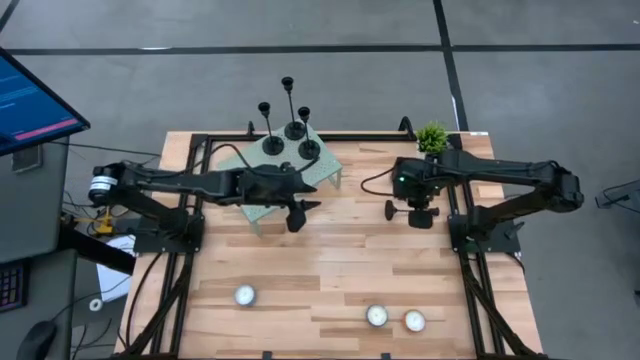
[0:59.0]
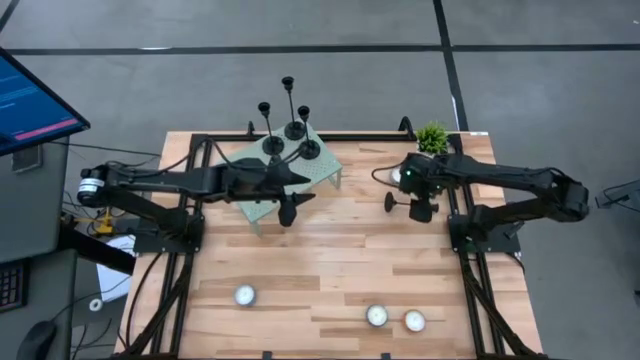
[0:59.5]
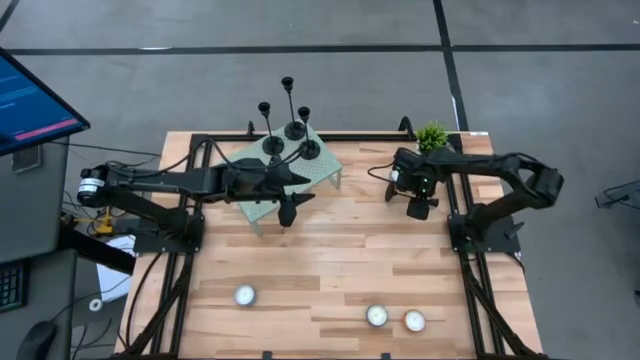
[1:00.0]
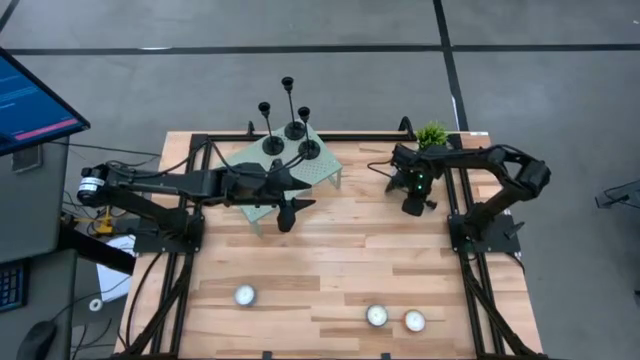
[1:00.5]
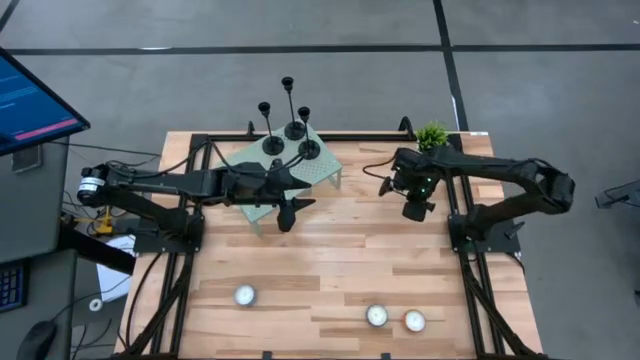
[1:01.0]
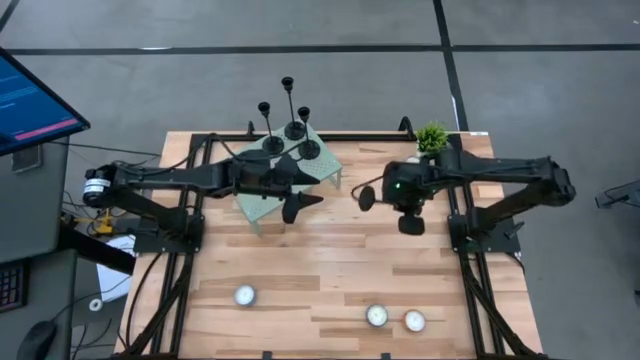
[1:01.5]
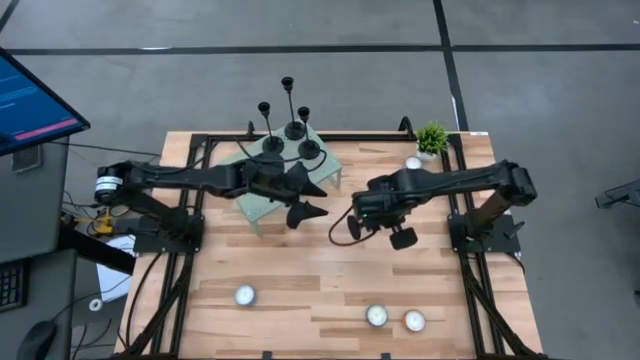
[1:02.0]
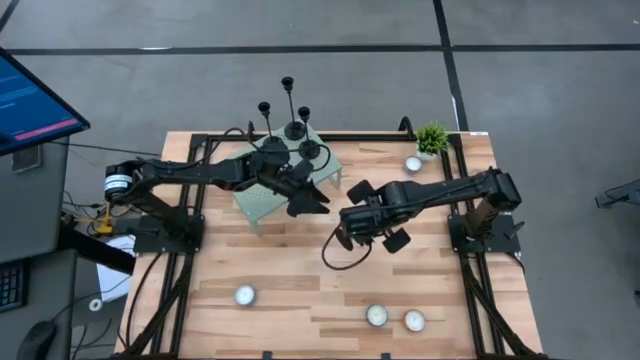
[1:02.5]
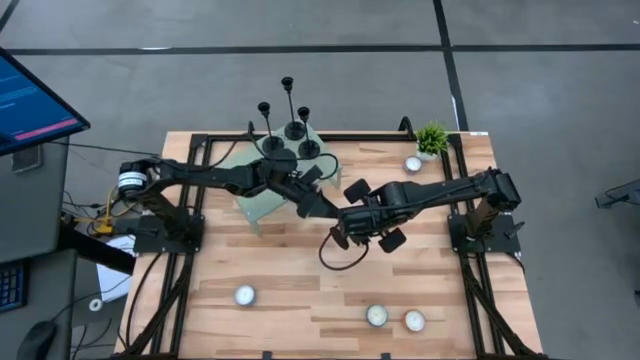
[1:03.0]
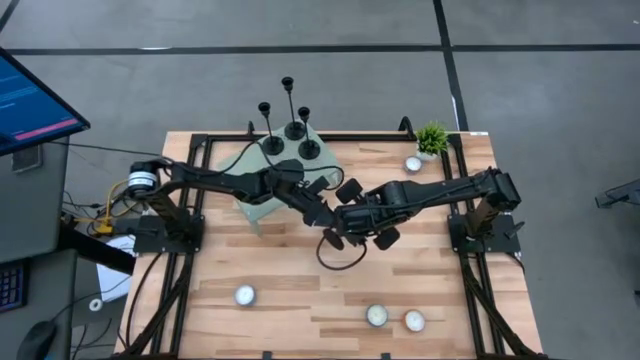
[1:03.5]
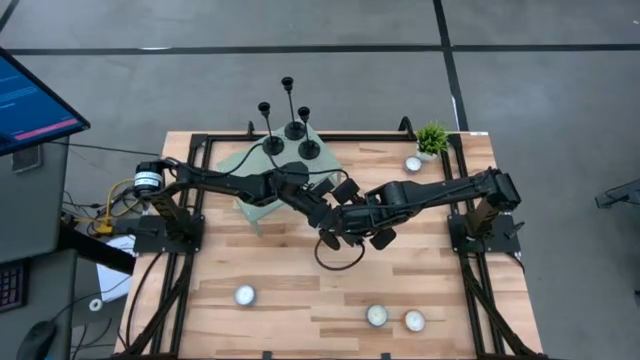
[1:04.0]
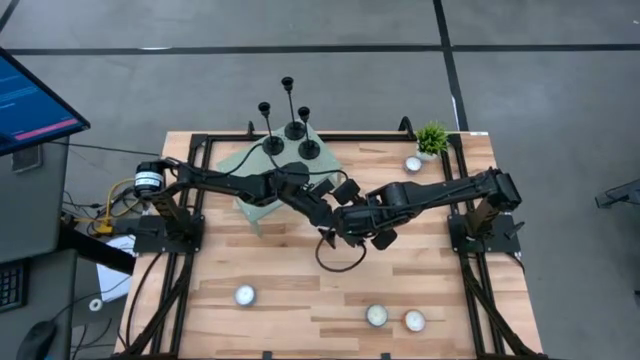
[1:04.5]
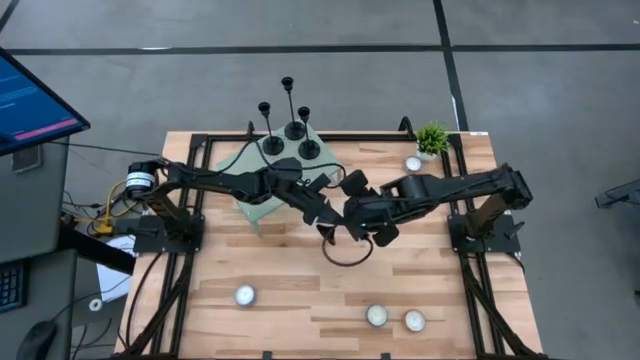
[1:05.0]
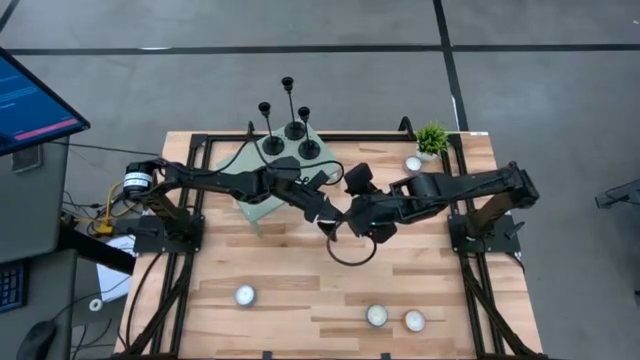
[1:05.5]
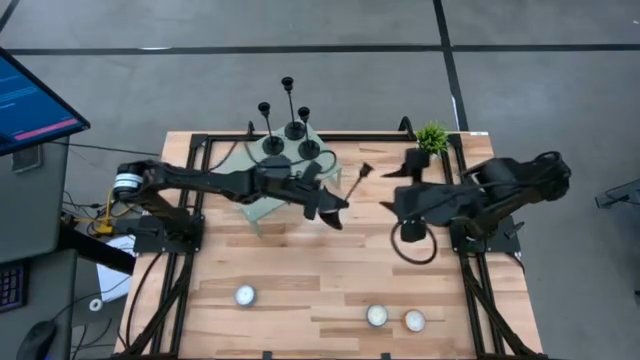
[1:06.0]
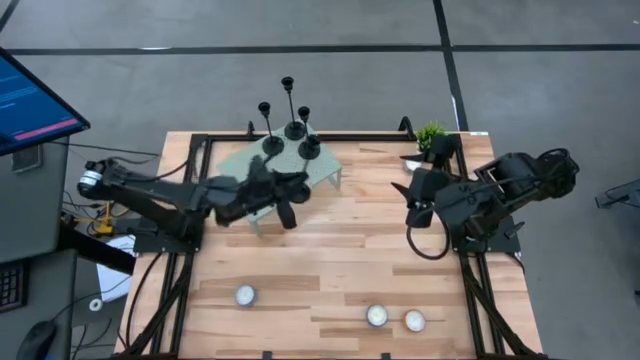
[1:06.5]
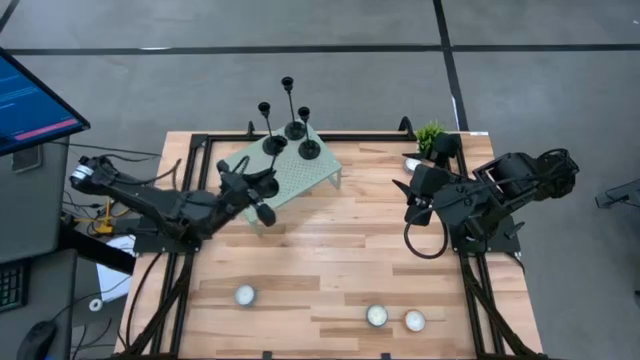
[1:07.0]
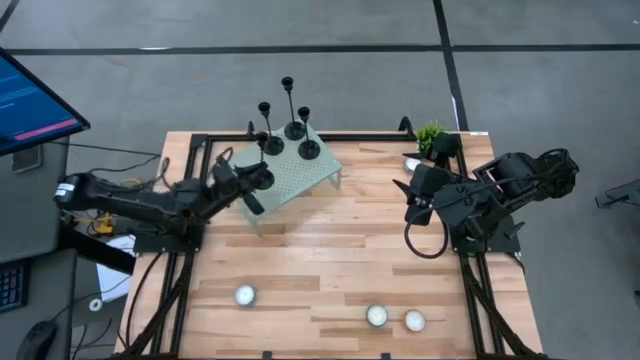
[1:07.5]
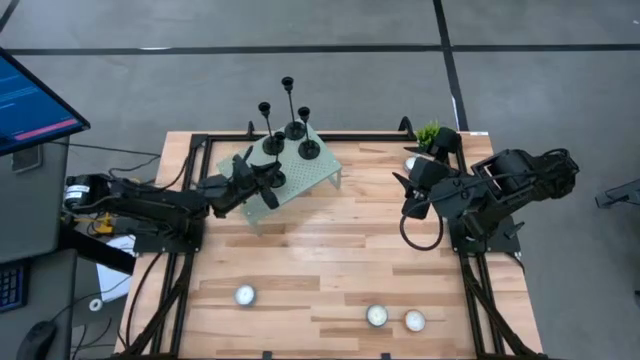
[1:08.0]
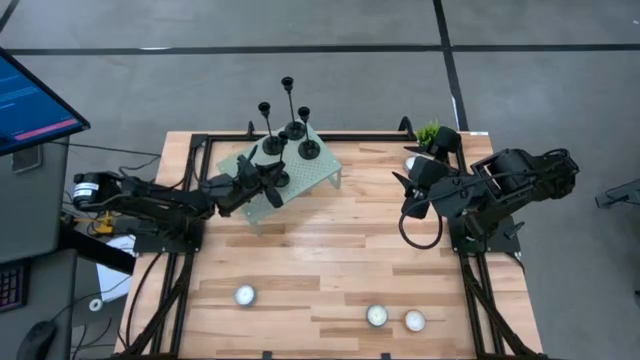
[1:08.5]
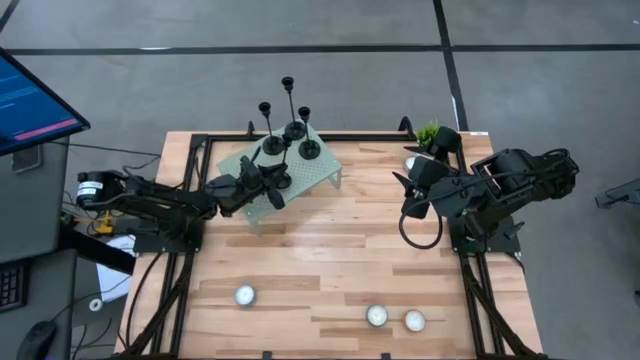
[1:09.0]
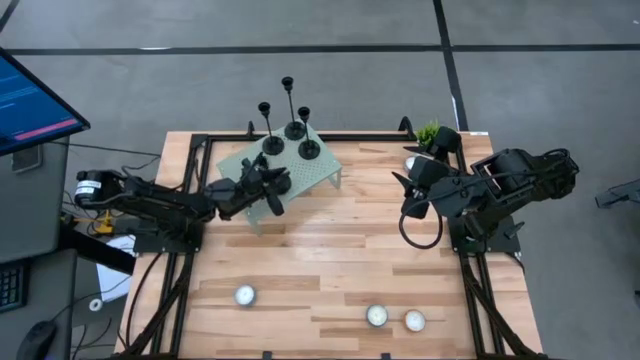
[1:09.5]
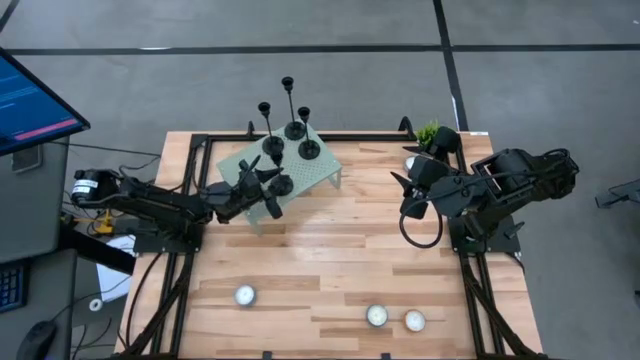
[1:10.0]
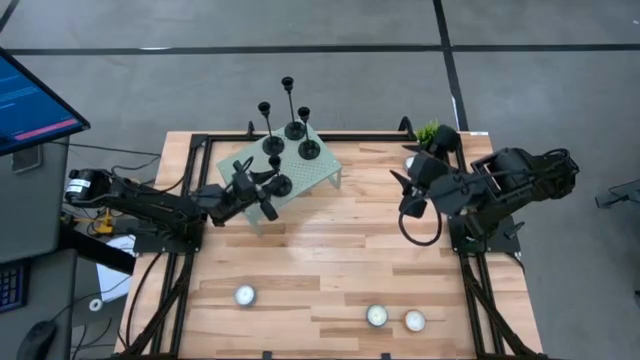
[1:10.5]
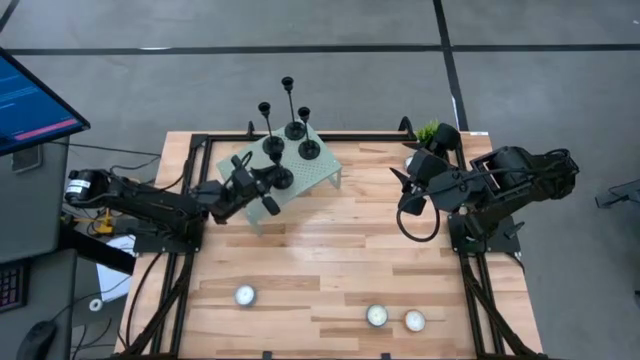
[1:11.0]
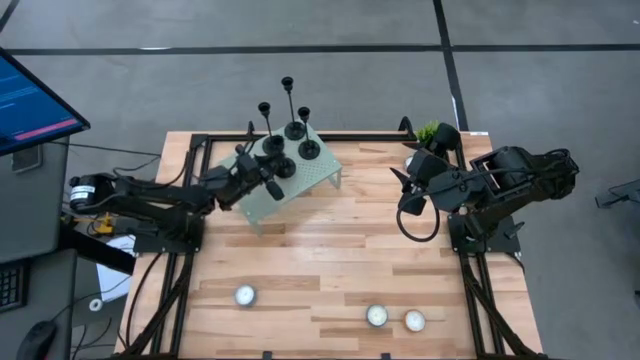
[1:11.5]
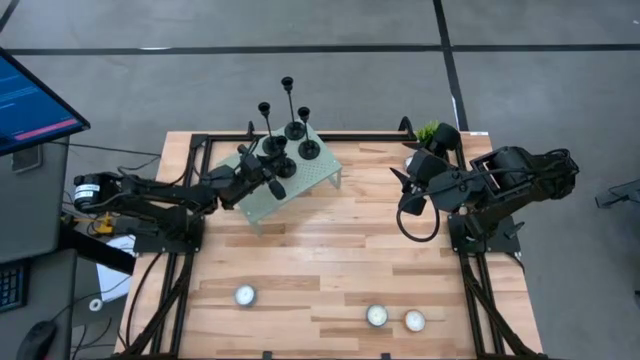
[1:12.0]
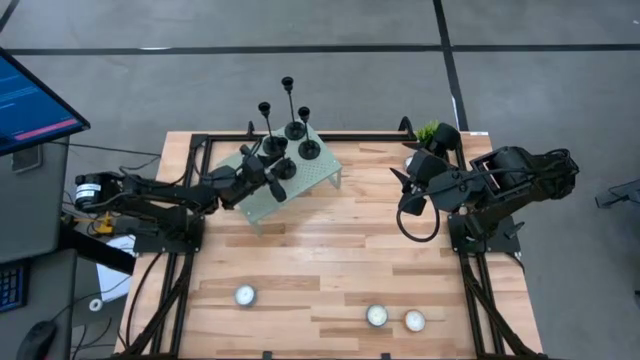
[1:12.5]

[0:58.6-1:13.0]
Task: Pick & Place candle stick holders
Align the black candle holder with the other black candle holder on the shelf

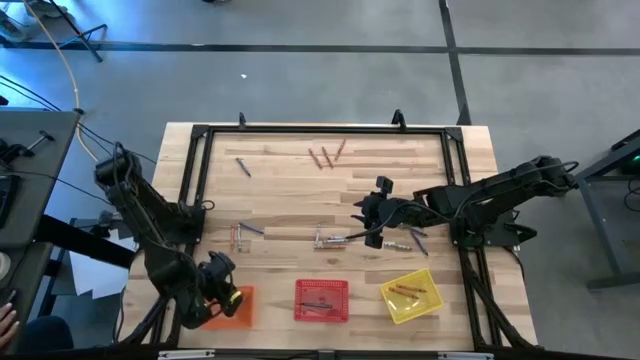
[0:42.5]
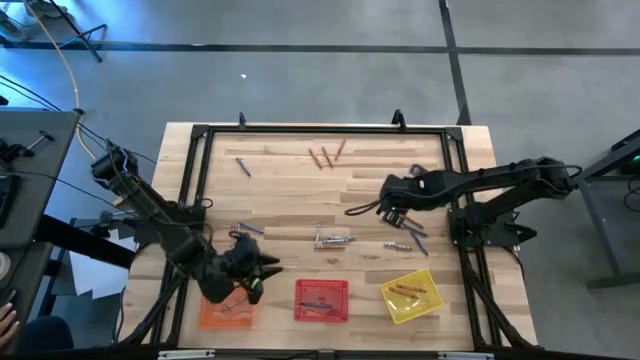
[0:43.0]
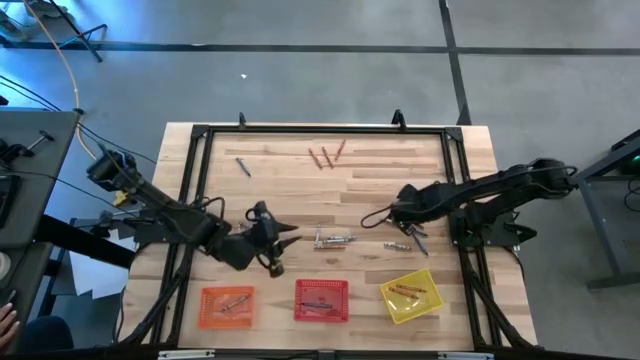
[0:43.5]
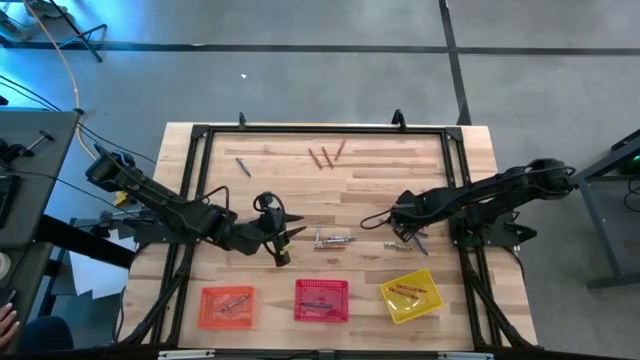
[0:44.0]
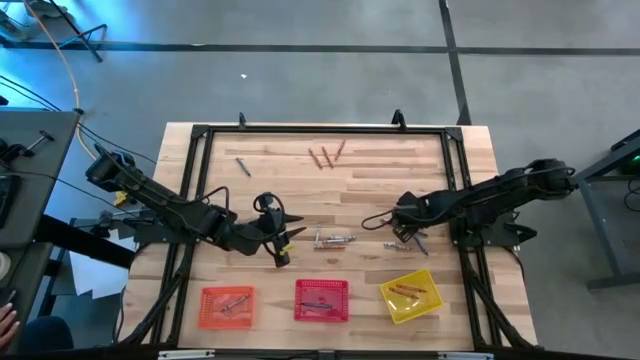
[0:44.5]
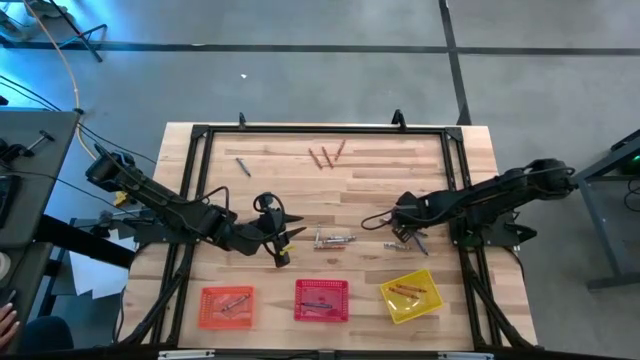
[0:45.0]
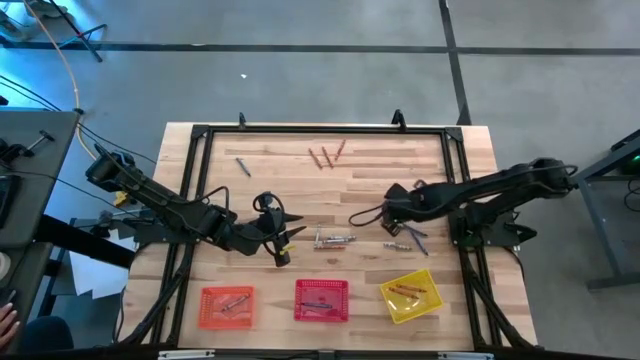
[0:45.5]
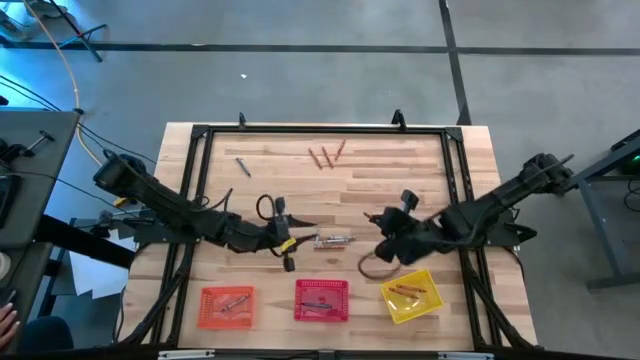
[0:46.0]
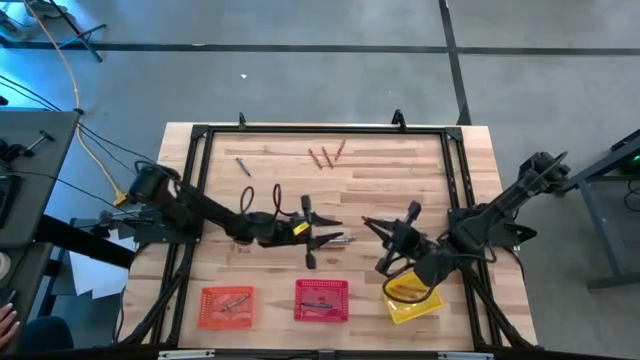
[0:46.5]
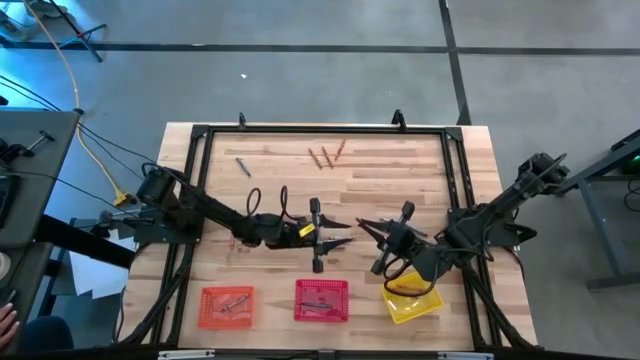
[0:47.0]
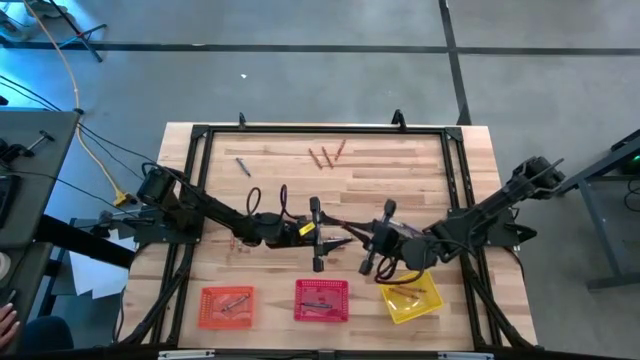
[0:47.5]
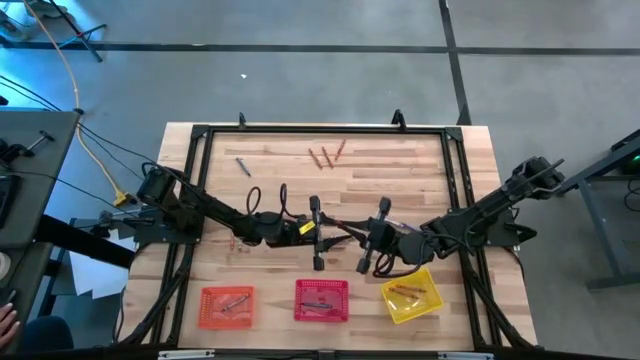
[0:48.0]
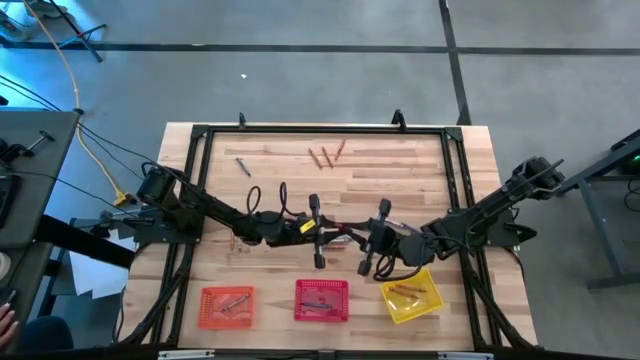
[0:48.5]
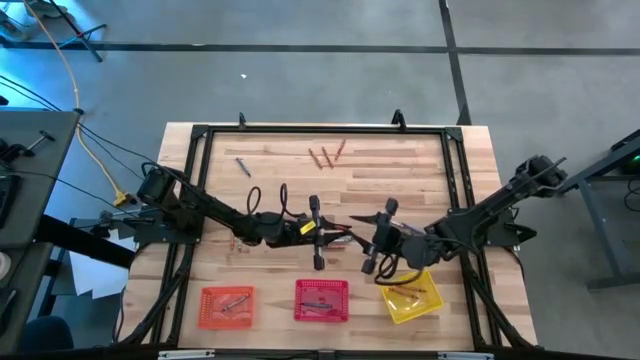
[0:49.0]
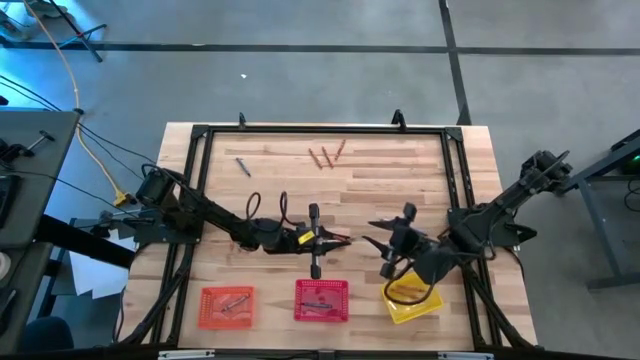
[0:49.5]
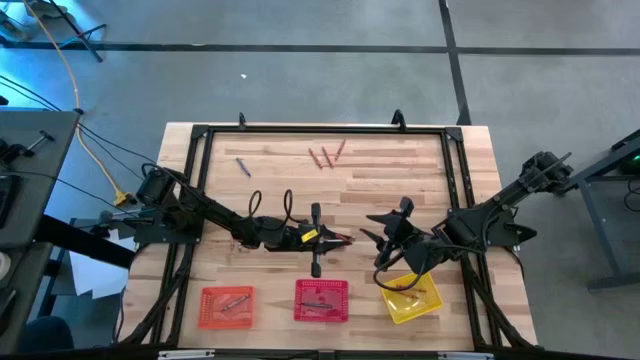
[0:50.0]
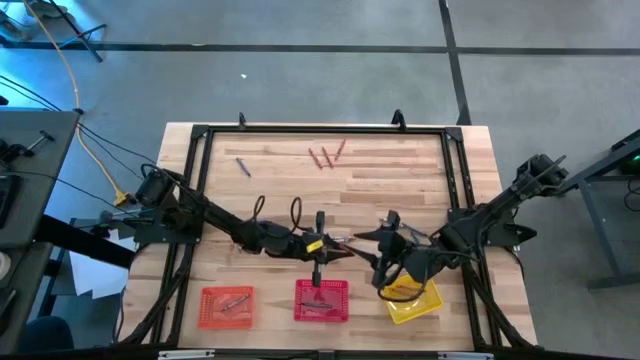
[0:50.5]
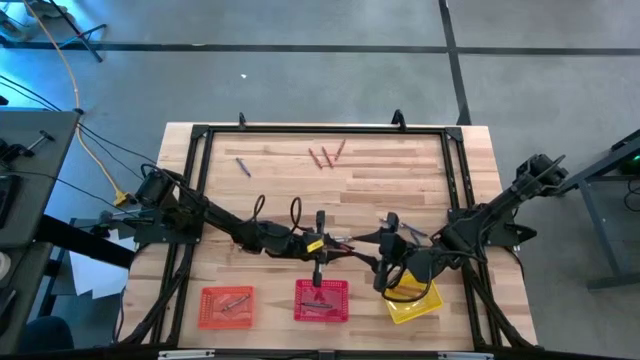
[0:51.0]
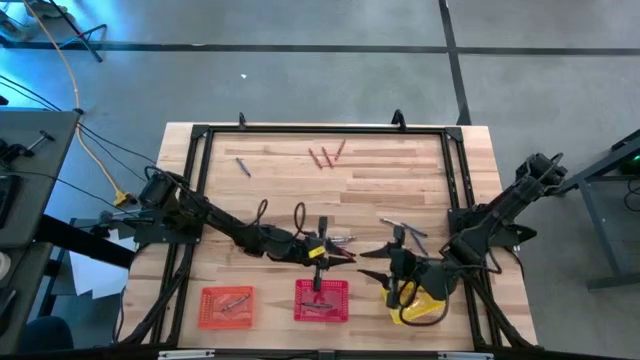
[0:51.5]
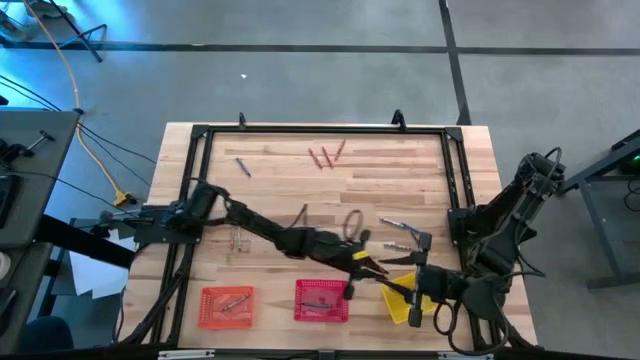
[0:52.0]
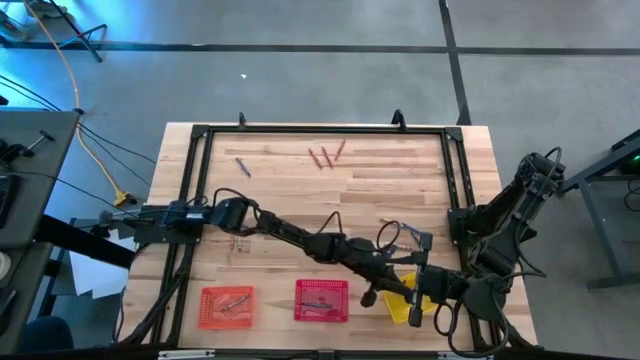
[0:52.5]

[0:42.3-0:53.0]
Task: Sort crayons
Put the orange crayon into the yellow bin
